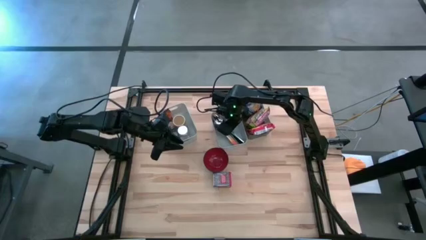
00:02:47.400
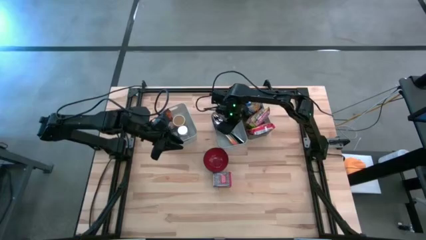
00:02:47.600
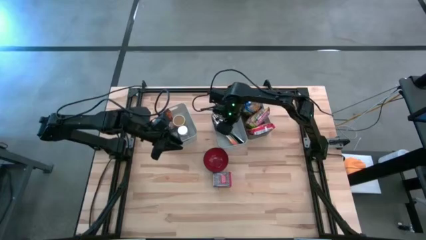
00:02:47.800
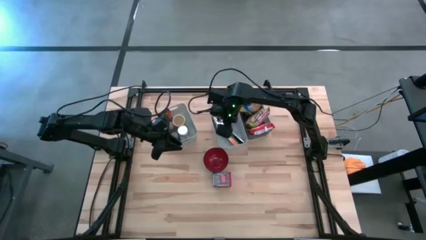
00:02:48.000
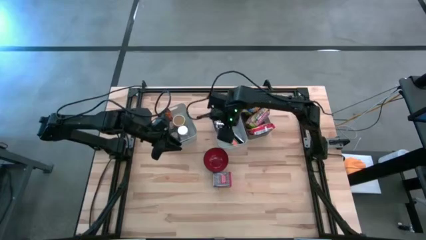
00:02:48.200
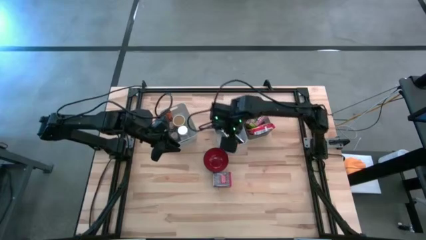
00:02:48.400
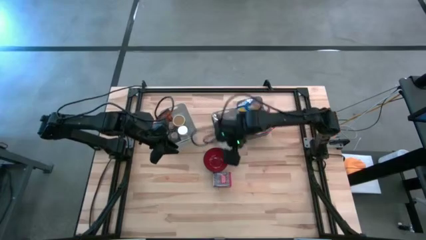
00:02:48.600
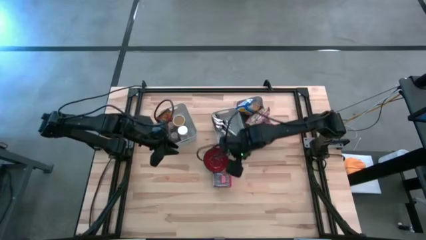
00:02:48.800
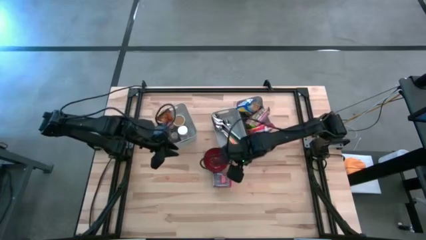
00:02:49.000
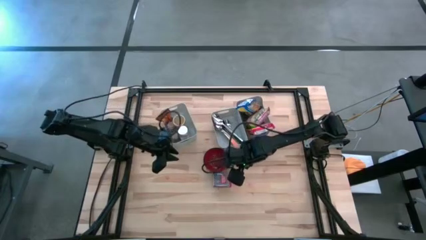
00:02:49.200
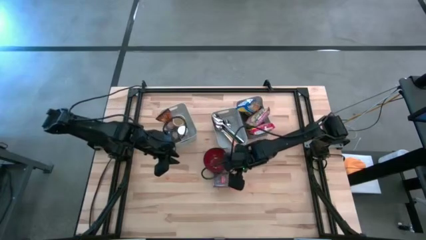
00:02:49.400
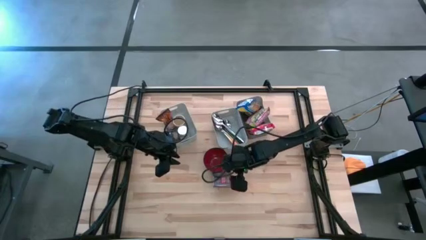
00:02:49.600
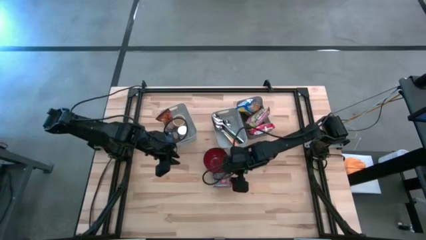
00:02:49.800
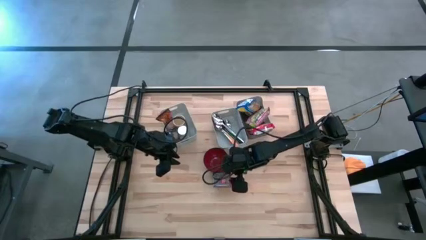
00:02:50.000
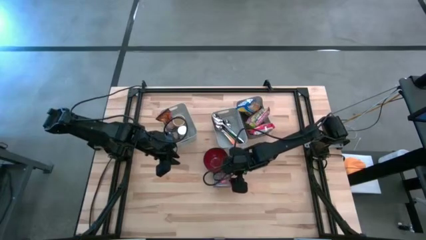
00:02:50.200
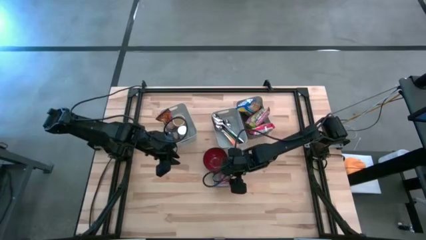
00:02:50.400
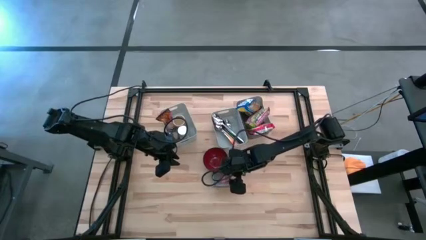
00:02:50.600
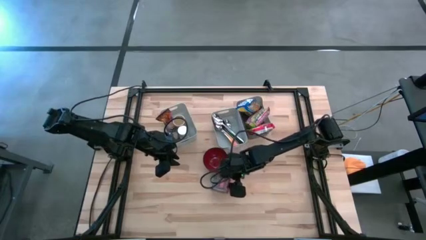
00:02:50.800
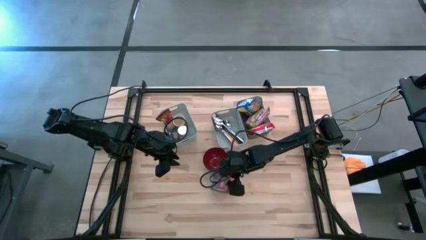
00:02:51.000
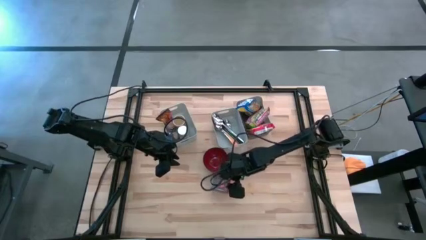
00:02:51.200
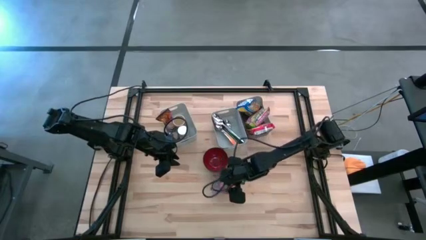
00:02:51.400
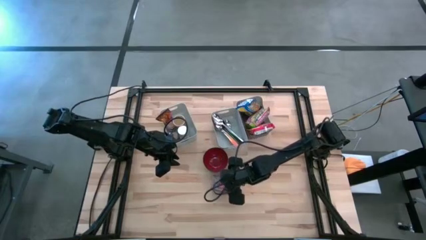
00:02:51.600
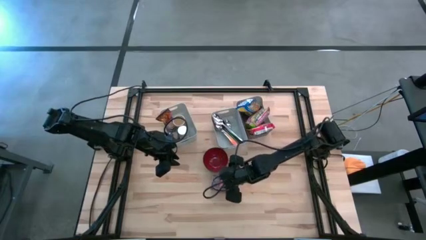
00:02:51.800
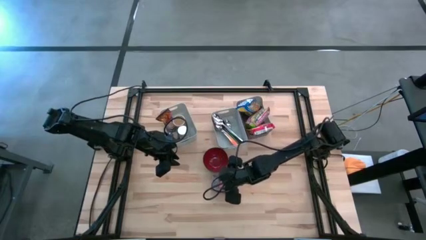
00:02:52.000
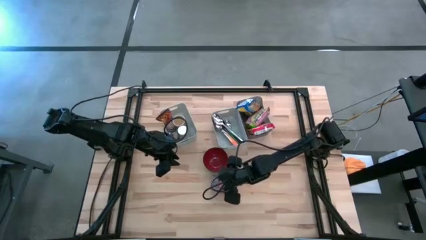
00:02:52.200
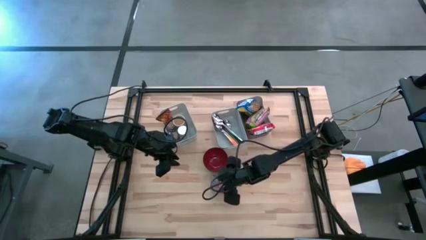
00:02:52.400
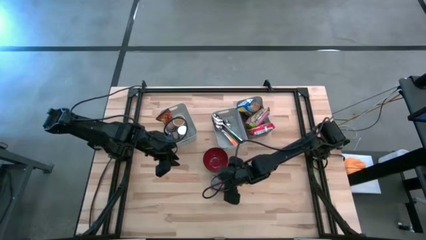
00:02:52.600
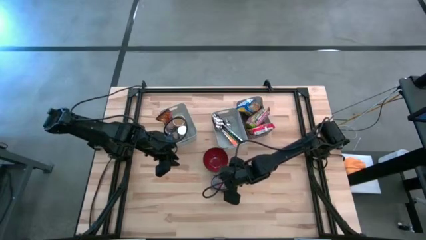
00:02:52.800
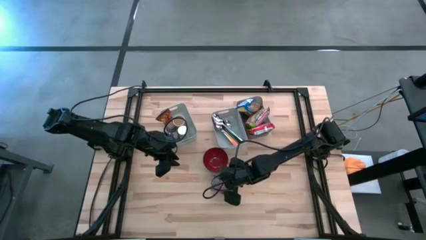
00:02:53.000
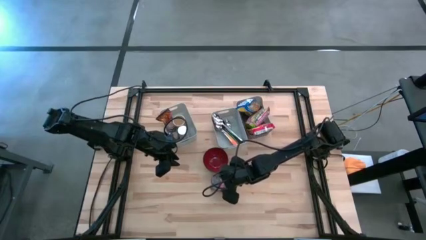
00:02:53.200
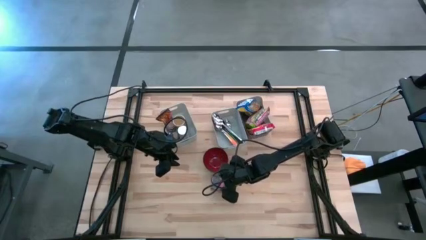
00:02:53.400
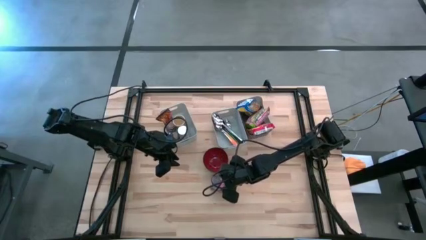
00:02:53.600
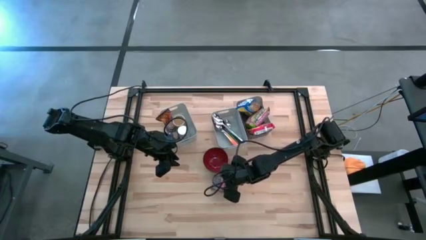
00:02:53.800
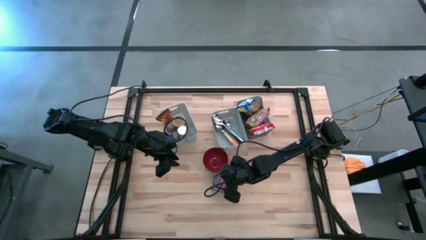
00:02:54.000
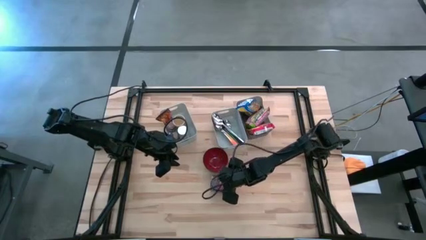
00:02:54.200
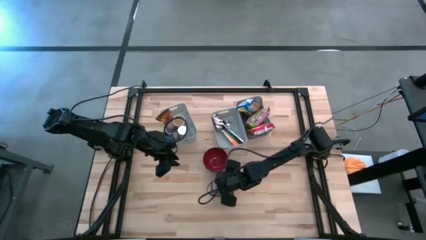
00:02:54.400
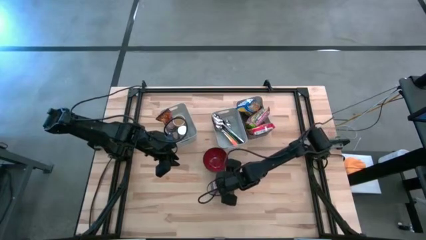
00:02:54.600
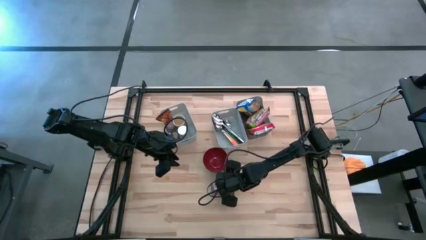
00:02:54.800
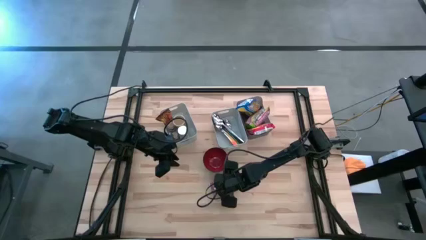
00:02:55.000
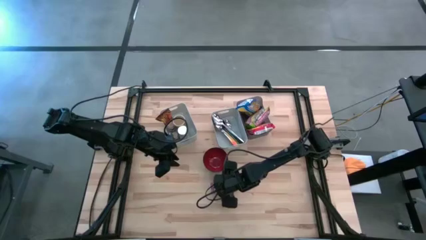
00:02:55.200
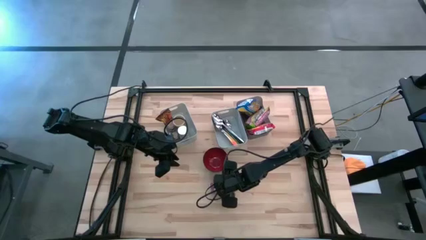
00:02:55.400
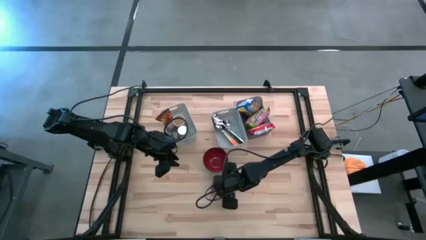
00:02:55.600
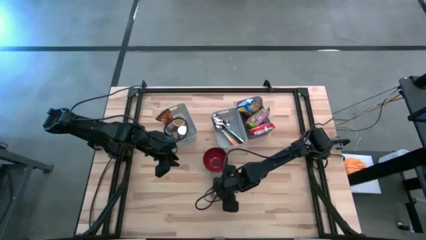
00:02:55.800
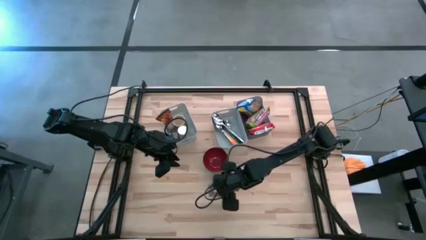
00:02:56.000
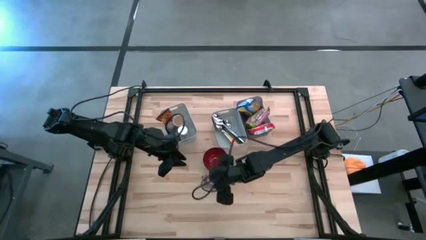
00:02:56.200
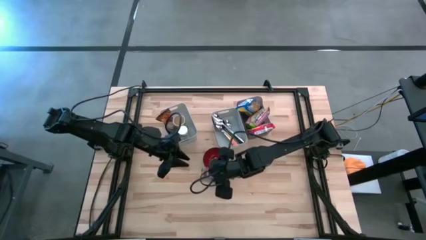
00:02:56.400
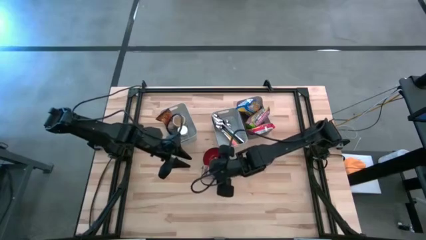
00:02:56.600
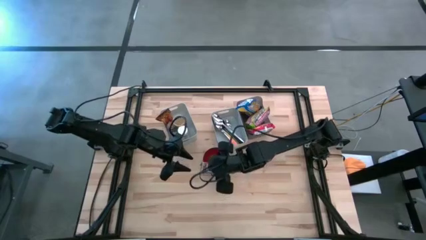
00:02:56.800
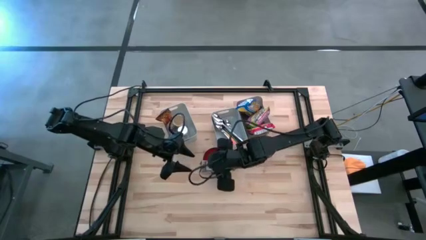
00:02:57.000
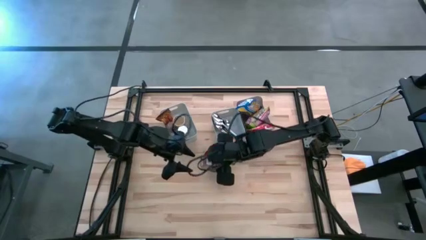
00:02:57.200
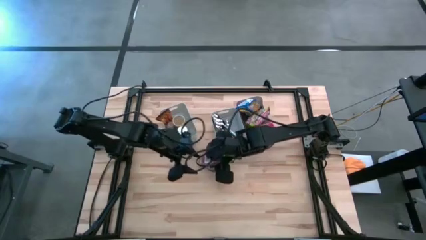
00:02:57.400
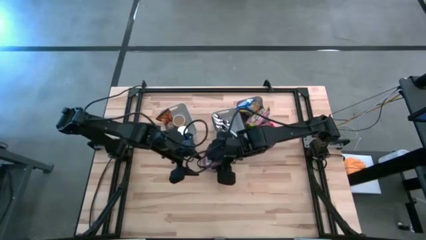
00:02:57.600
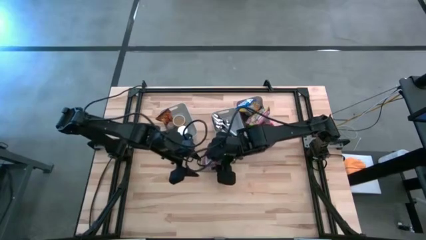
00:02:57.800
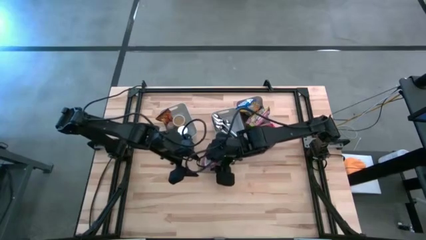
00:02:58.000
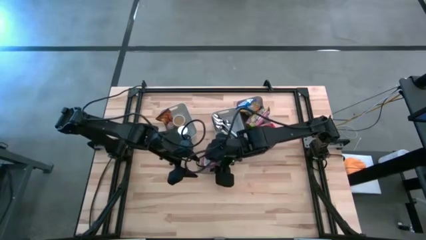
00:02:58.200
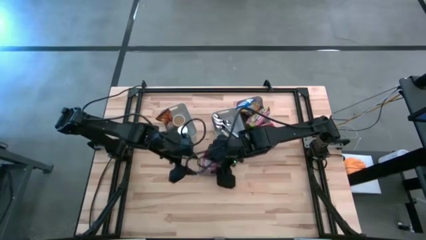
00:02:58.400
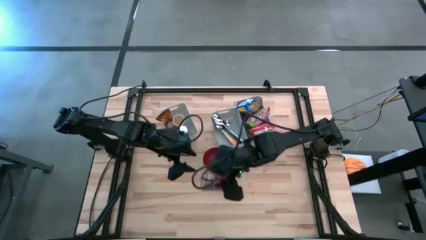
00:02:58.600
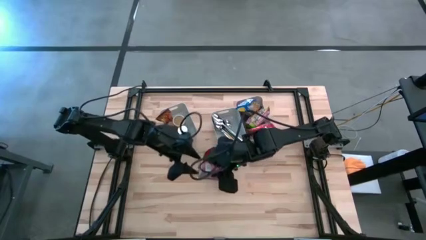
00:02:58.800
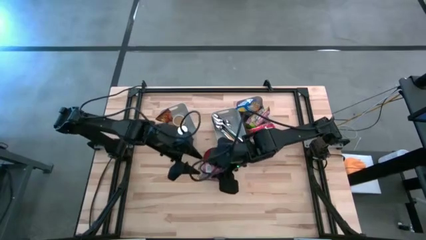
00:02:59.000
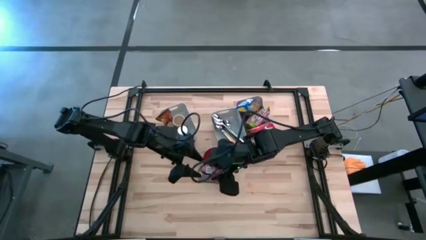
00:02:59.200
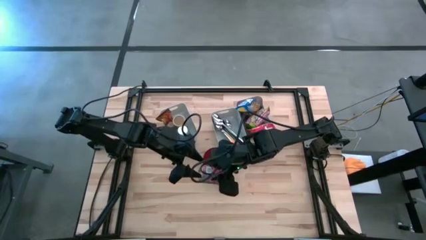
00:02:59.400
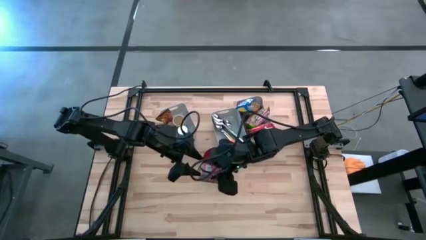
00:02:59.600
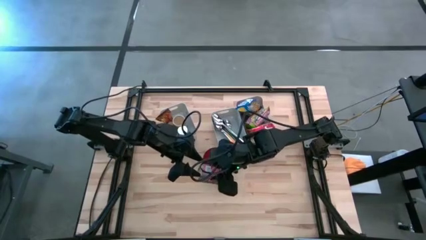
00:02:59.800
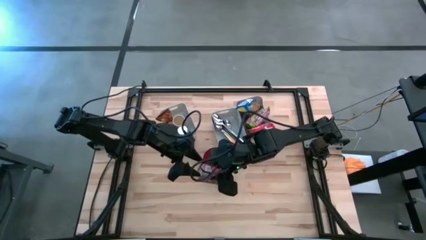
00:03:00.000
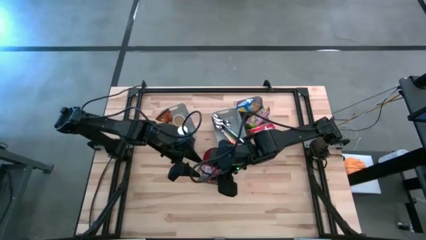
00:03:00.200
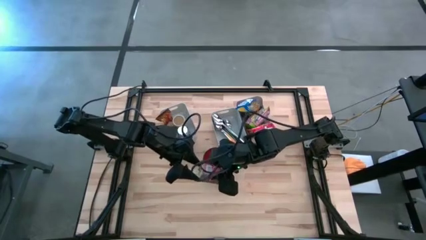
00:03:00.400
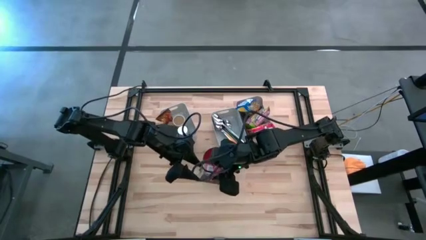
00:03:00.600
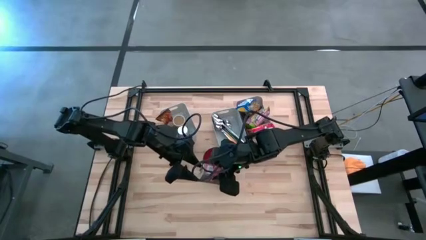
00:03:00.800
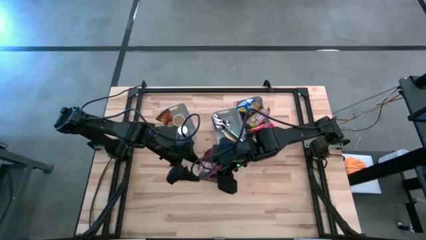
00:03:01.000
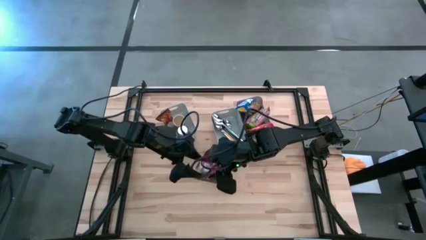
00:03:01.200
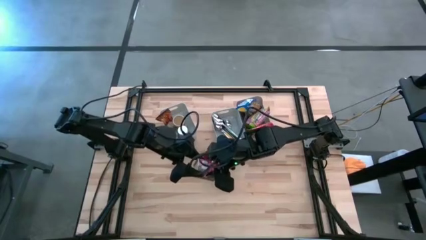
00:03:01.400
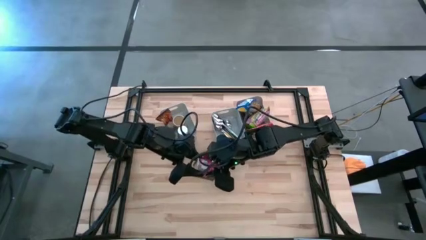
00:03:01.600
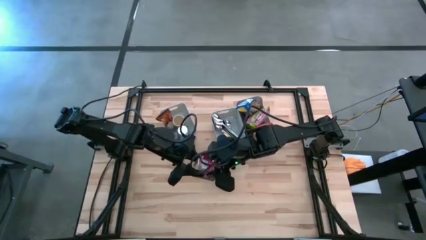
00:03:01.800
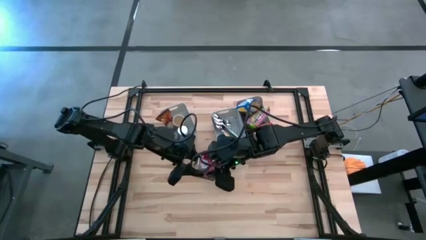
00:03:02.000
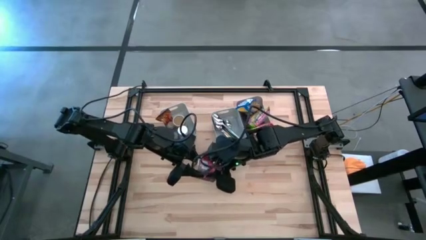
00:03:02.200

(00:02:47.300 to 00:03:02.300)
Put the red seasoning can into the left white bin
